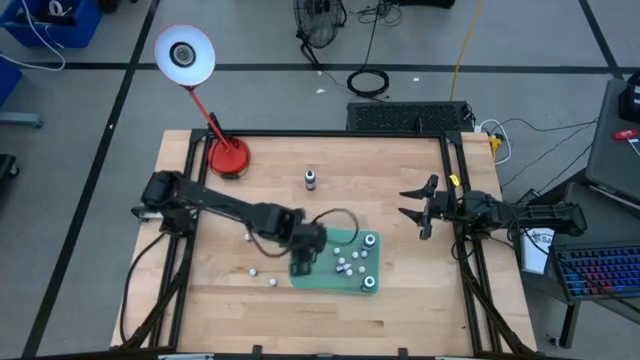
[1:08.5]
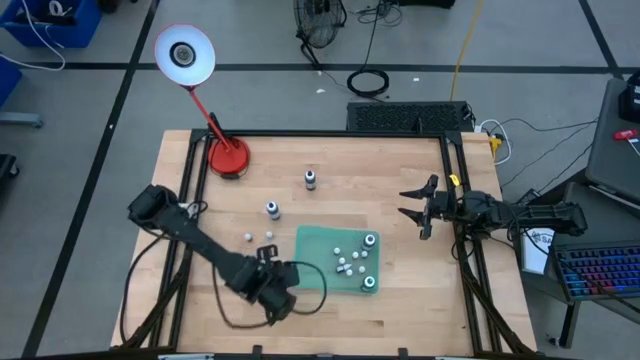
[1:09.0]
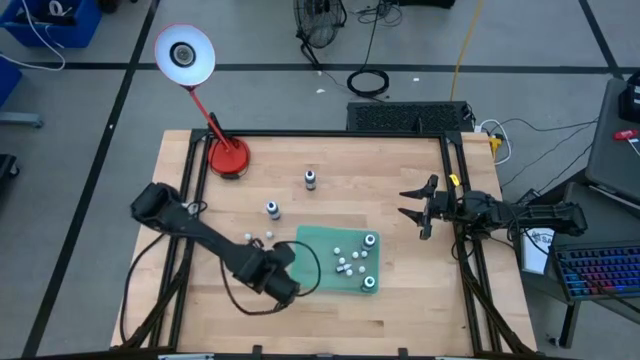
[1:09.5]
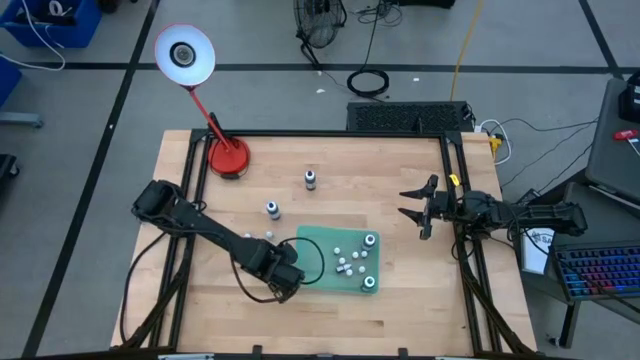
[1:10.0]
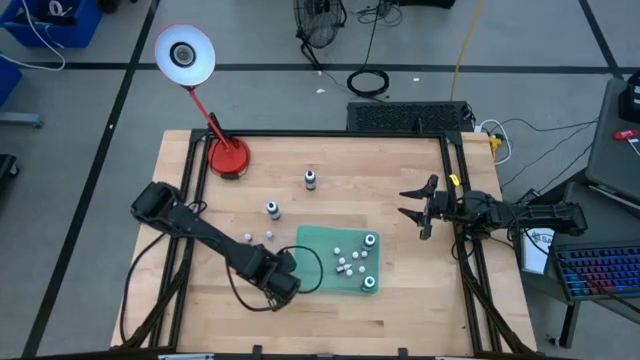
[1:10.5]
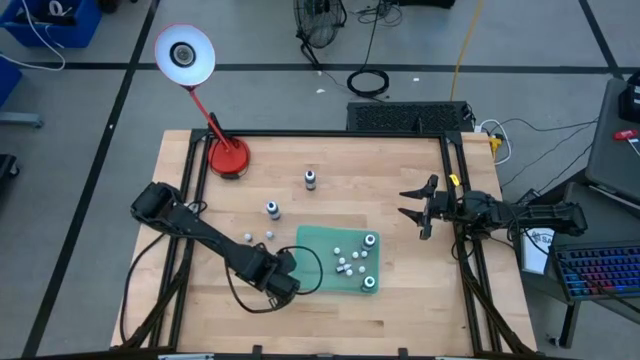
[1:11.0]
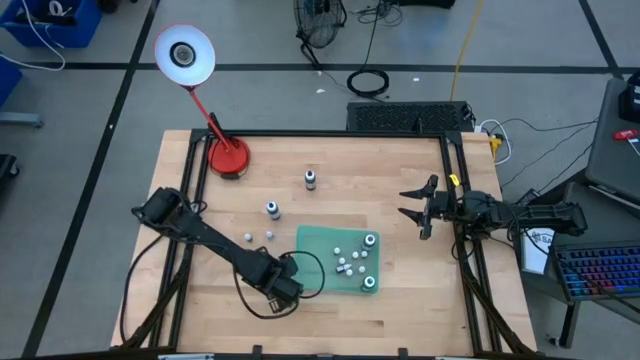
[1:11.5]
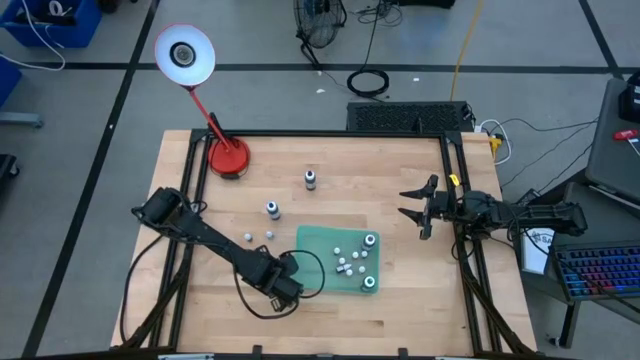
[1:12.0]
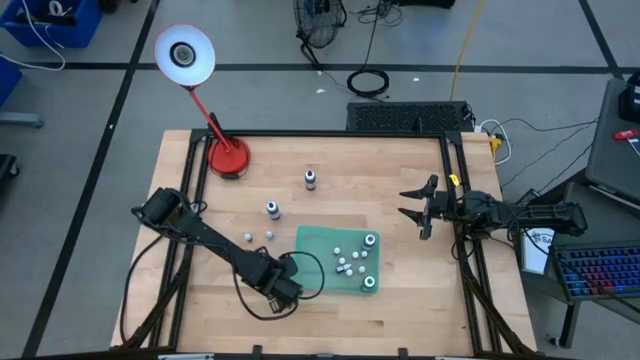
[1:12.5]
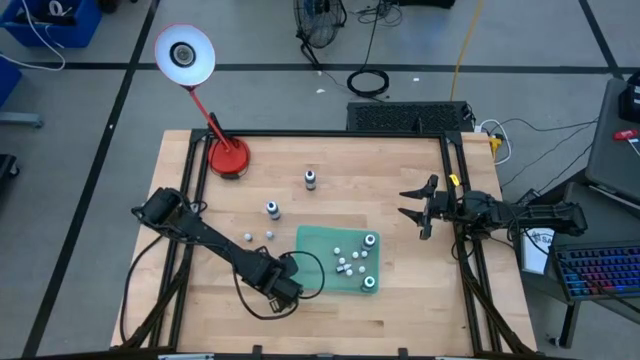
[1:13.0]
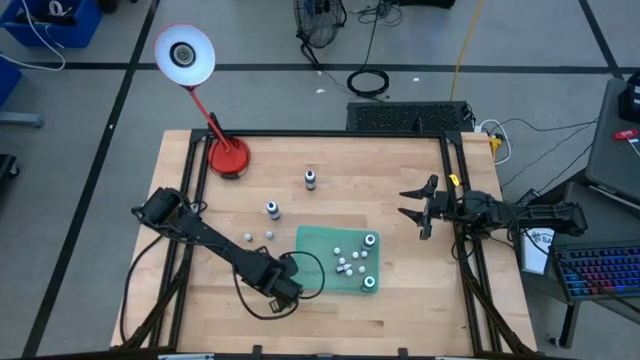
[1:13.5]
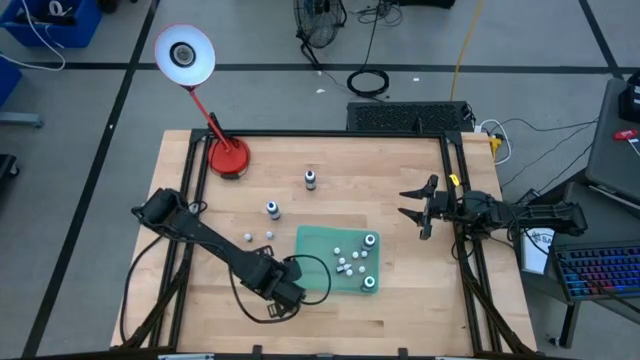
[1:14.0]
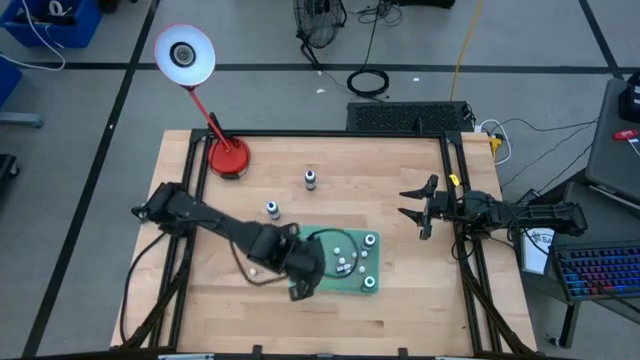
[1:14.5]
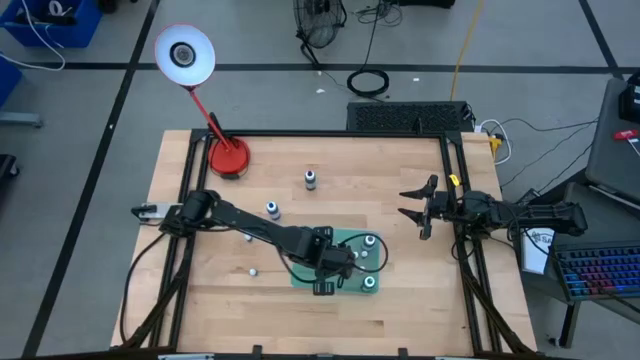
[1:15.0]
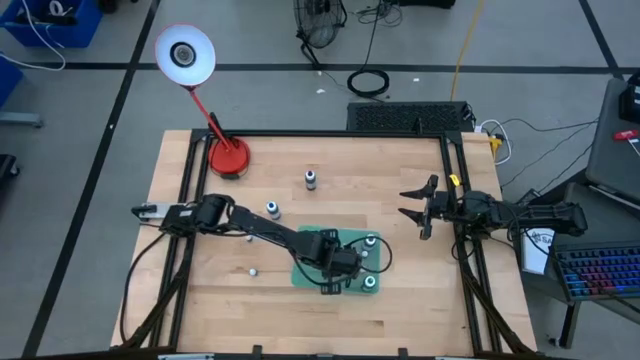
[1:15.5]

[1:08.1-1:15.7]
Task: Pick & Place food coloring
Put the small red food coloring bottle into the green bin

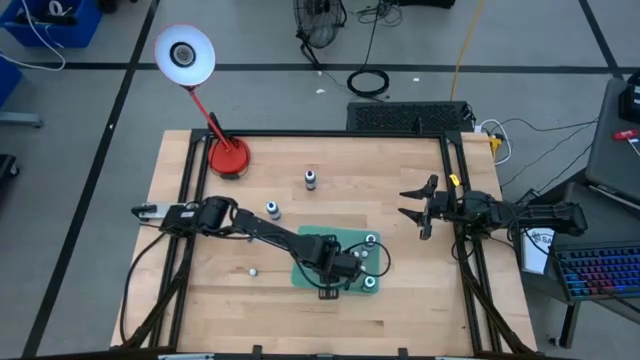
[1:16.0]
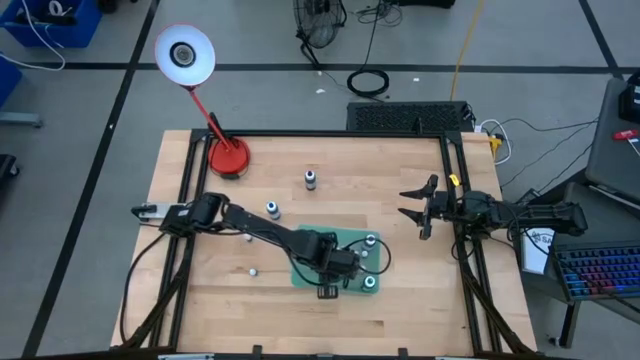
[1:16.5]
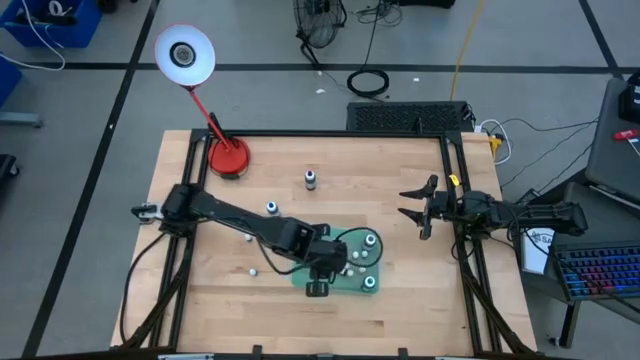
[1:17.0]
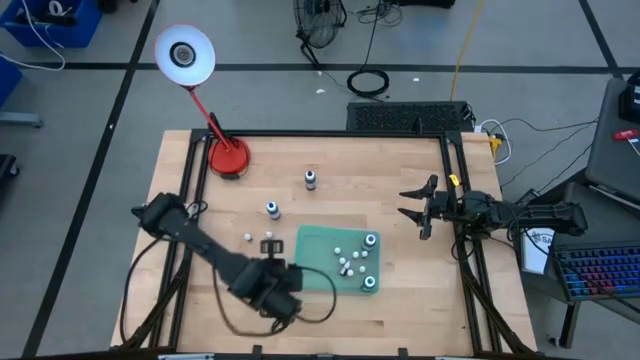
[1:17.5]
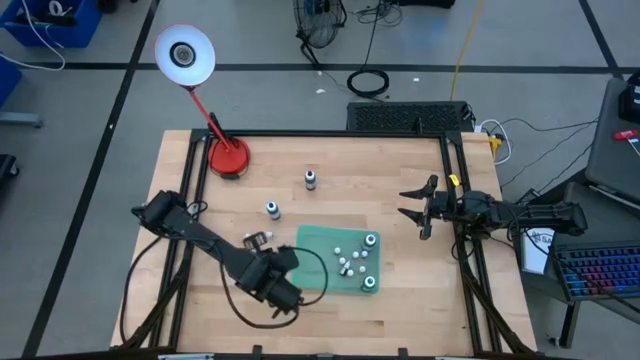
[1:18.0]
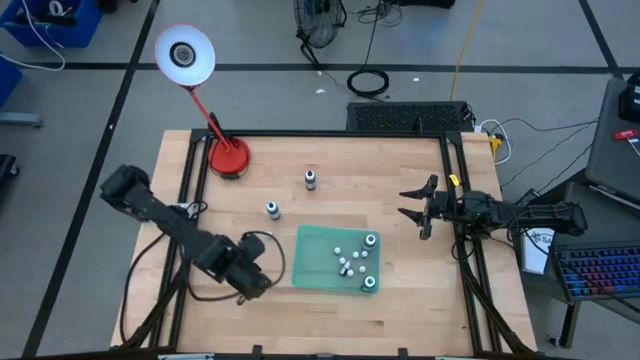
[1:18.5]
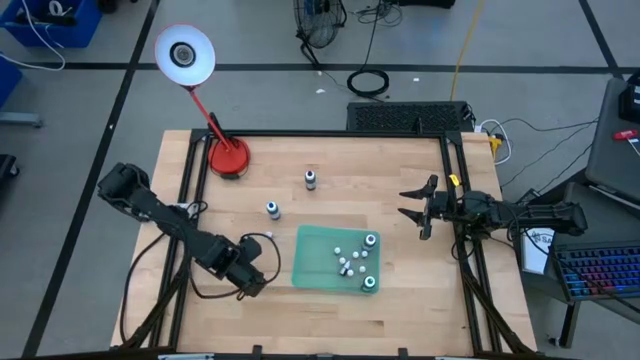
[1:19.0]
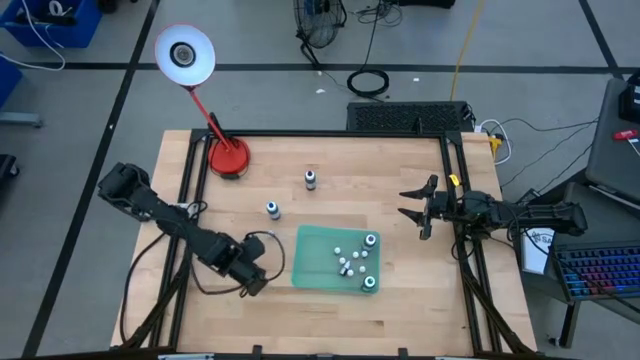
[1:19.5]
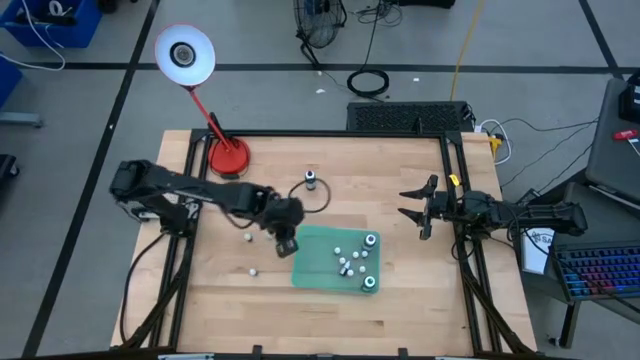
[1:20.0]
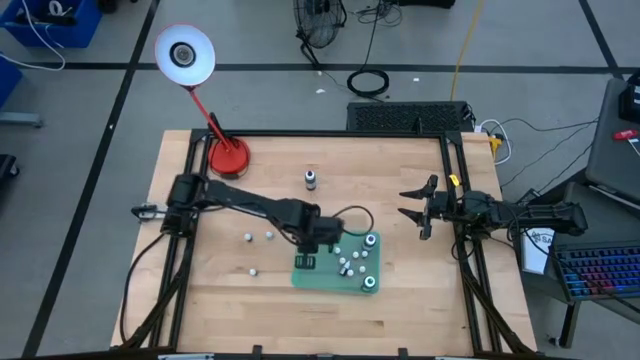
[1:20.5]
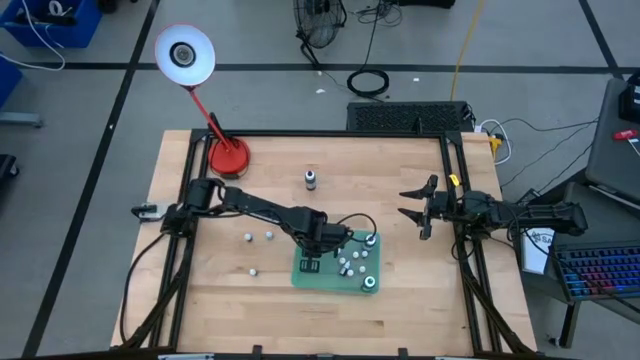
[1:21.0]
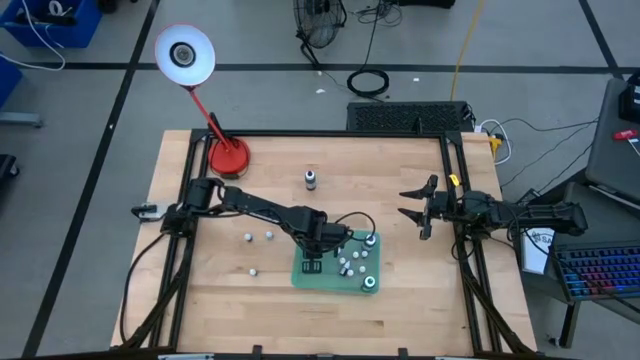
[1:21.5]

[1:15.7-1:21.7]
Put the small red food coloring bottle into the green bin

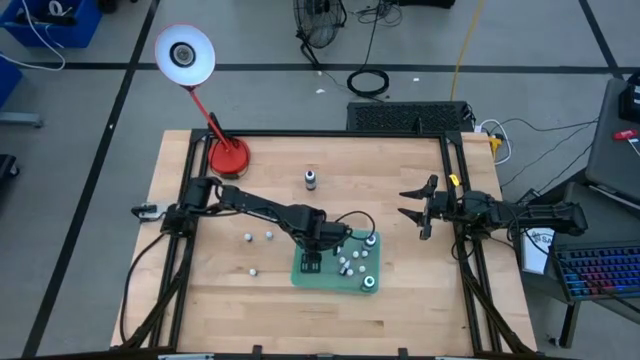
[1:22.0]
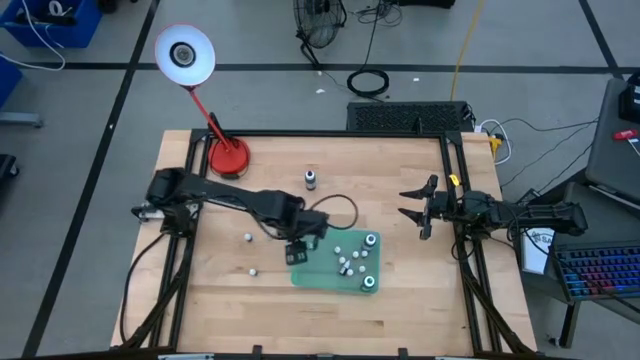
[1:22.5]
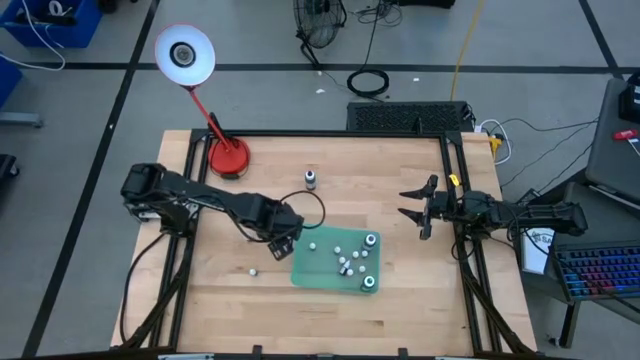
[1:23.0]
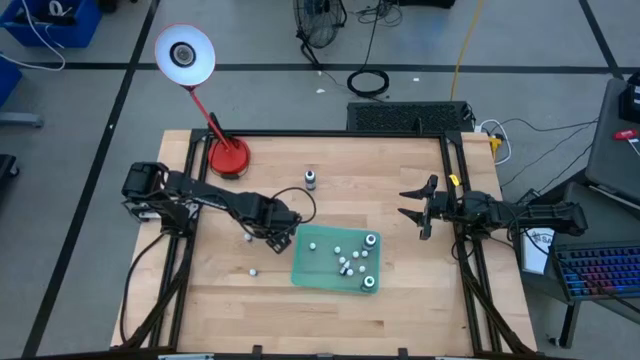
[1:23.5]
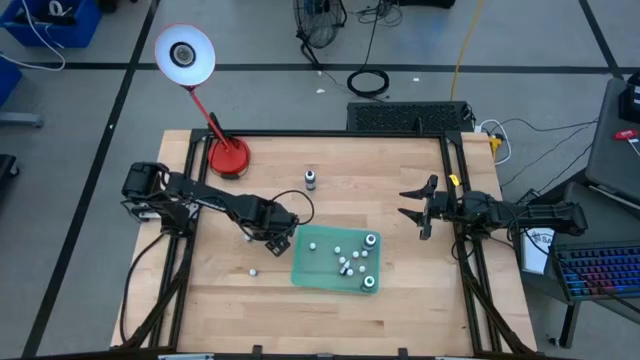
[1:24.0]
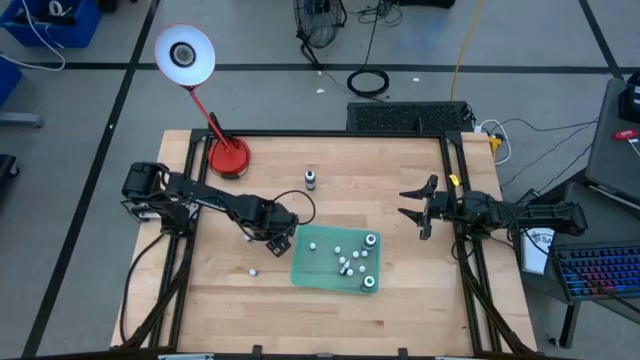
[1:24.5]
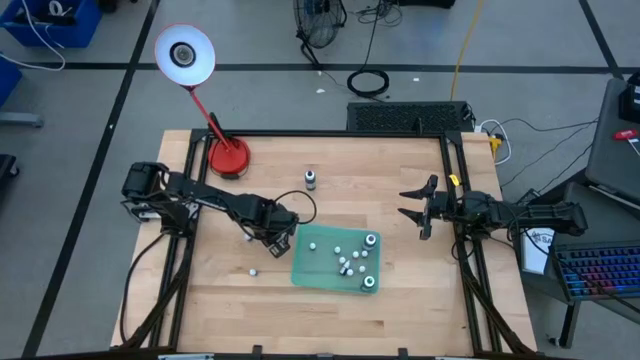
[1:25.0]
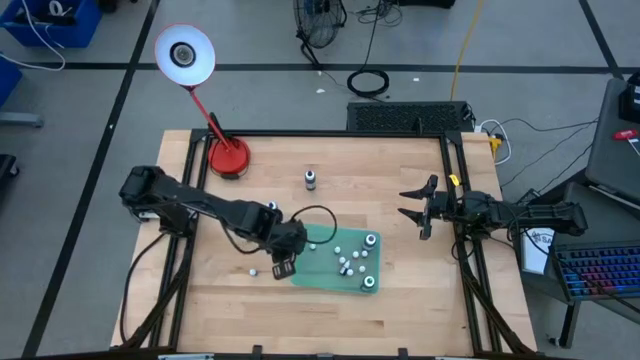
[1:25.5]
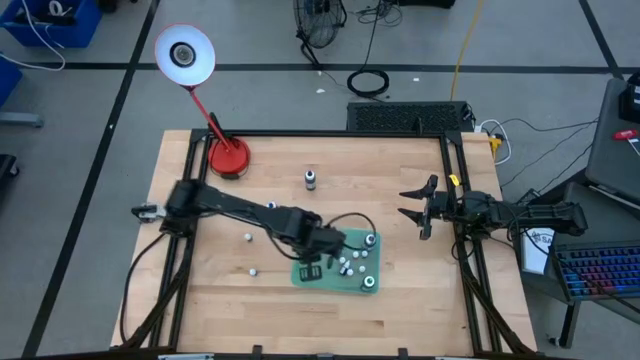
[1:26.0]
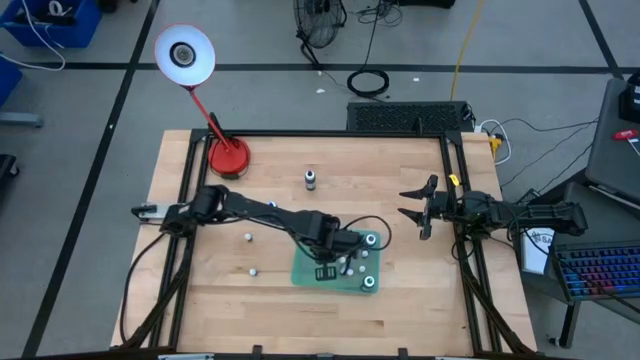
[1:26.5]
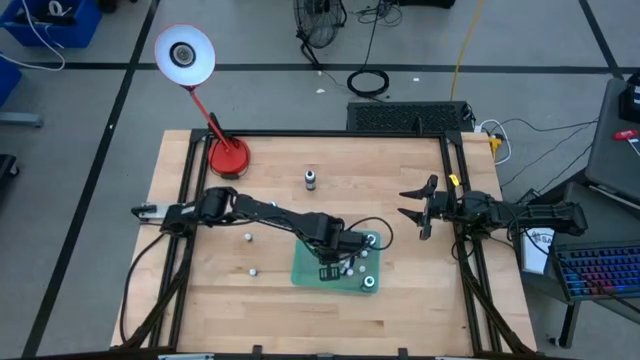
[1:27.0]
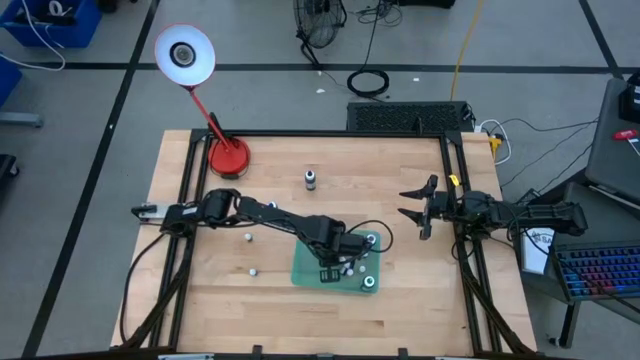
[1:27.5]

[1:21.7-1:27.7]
Put the small black food coloring bottle into the green bin

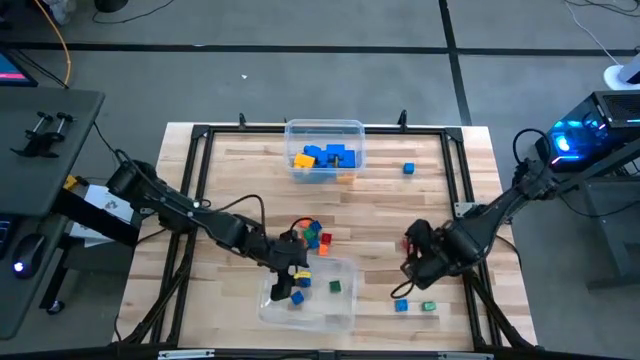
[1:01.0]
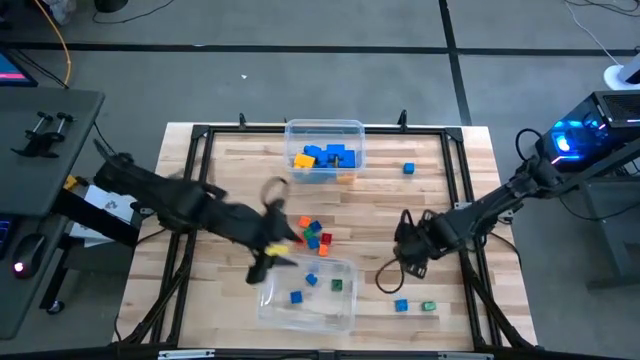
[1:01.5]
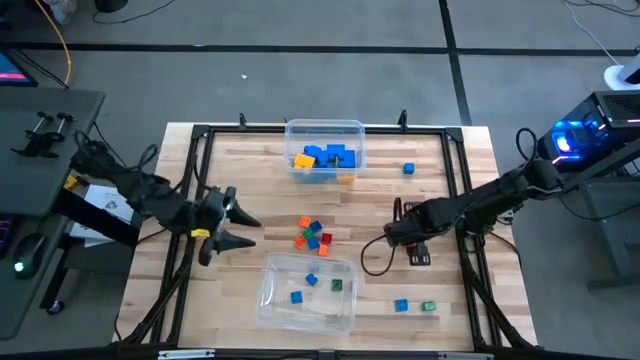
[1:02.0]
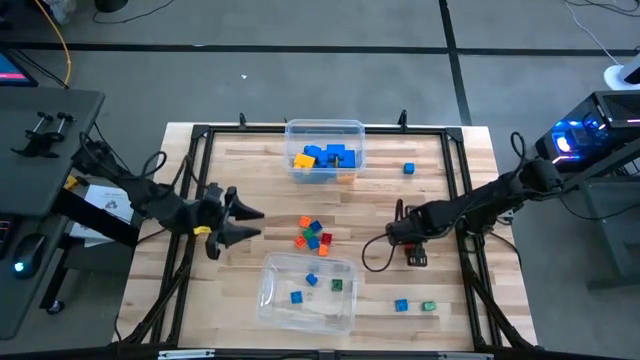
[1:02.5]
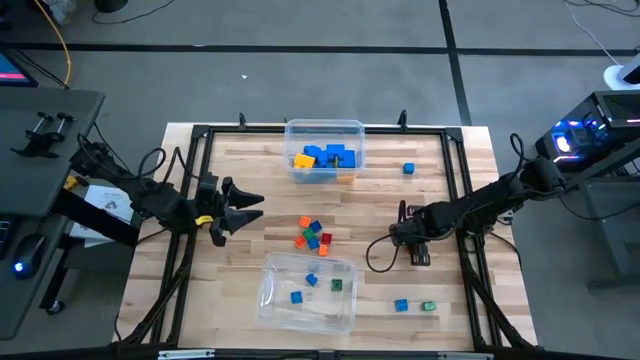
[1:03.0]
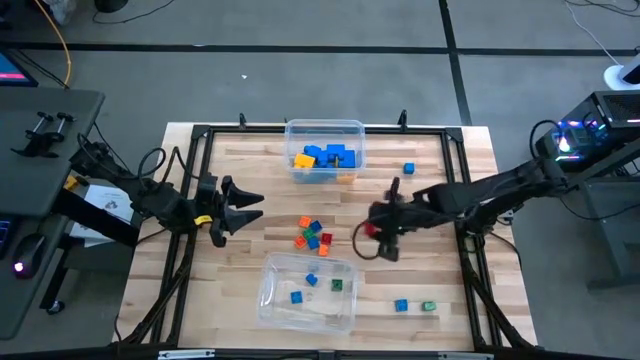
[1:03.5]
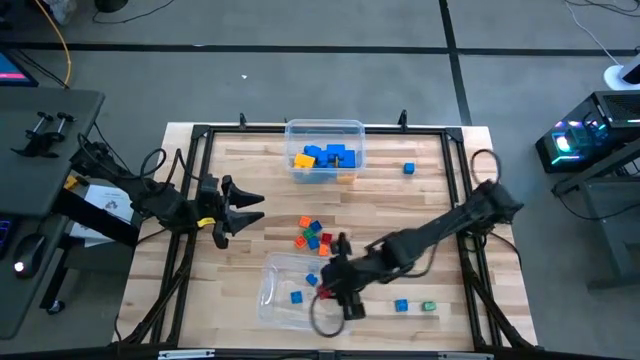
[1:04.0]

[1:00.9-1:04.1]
Task: Sort blocks by size
Put the red game piece into the bottom transparent bin
